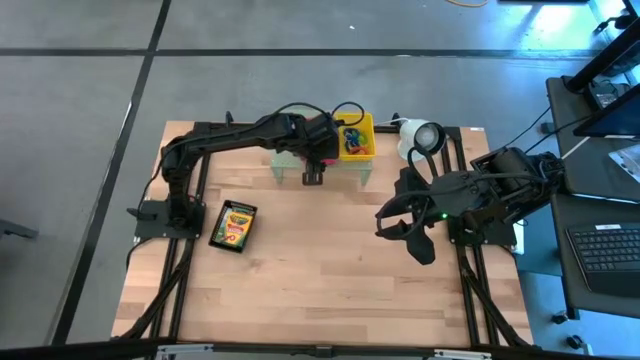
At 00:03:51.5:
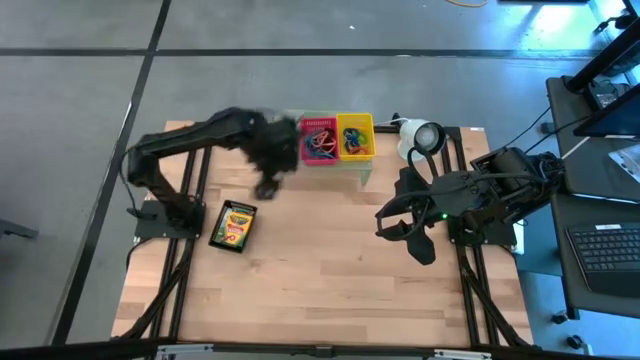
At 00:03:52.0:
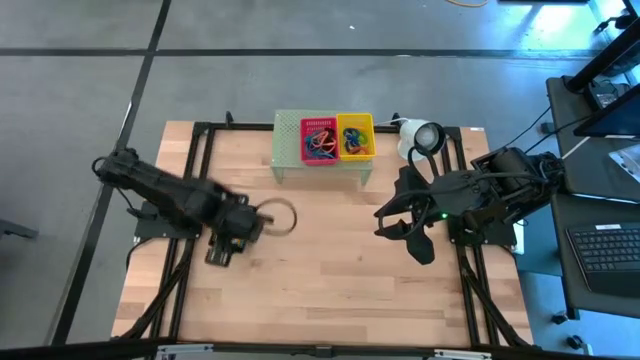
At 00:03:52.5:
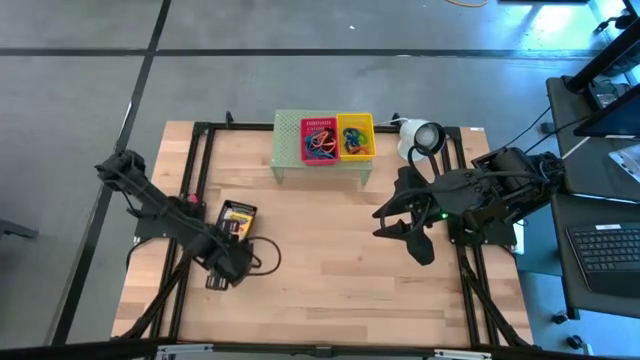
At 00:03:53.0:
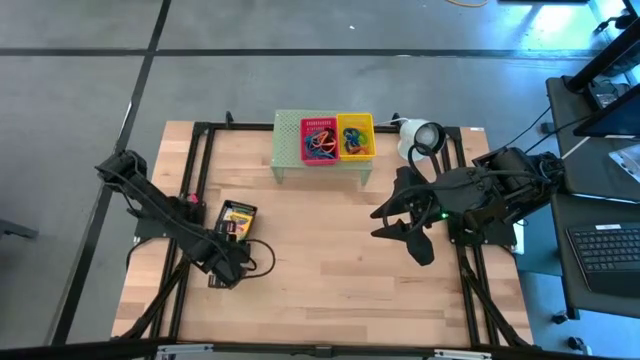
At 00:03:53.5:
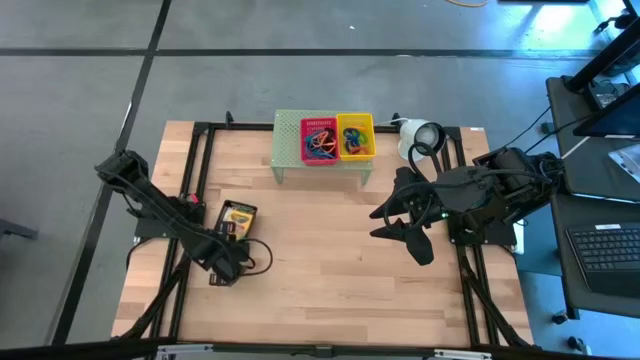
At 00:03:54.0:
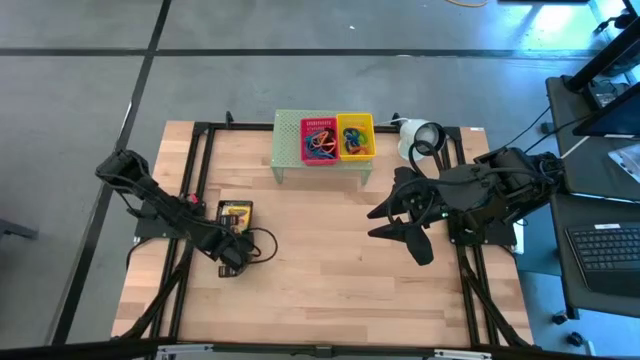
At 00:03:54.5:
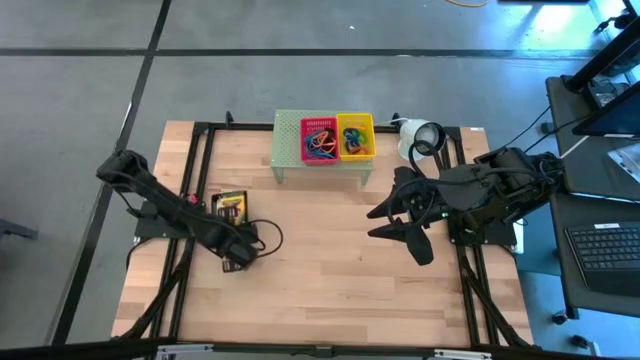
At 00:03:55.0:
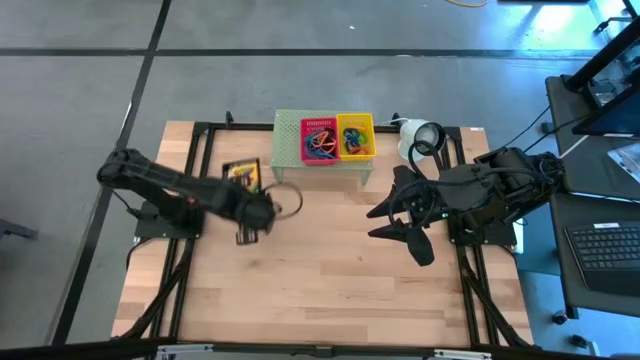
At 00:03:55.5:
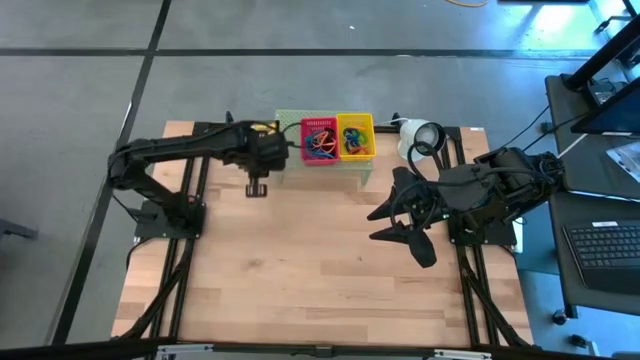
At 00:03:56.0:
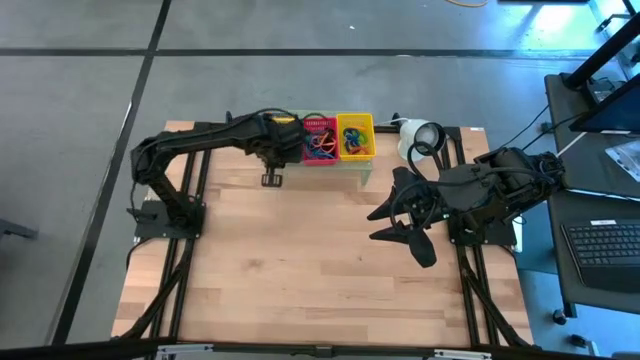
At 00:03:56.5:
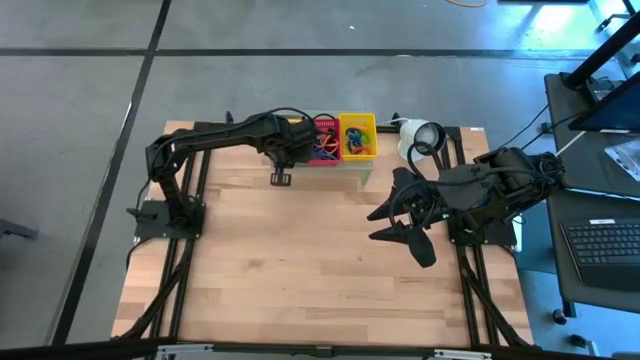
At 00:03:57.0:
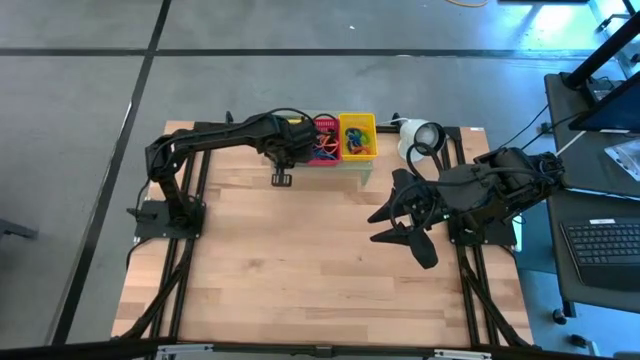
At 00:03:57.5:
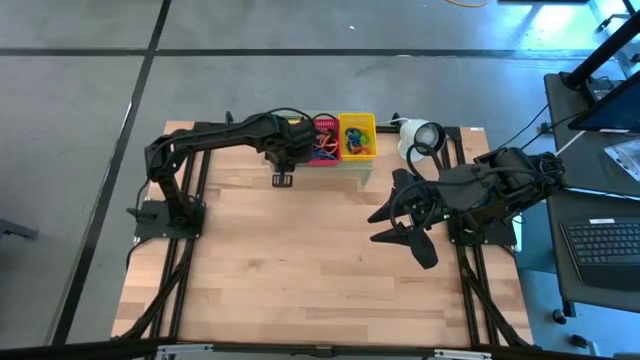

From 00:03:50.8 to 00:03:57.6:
Task: Pick & Place Office Desk Supplies
Put the black bin on the shelf

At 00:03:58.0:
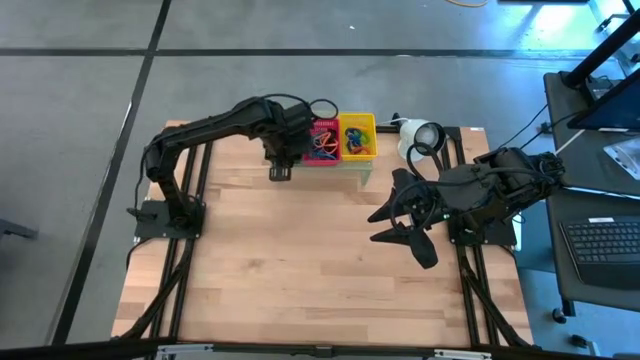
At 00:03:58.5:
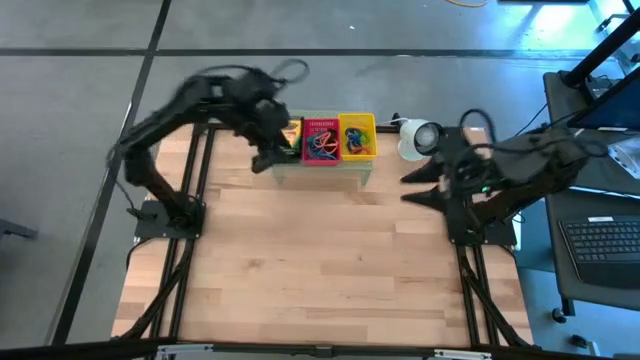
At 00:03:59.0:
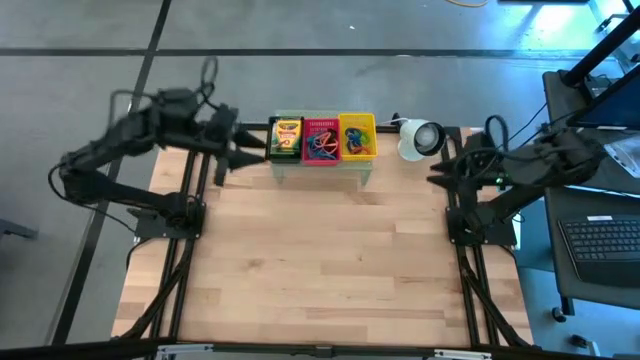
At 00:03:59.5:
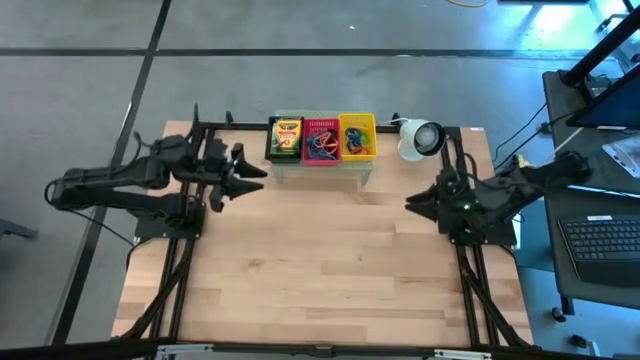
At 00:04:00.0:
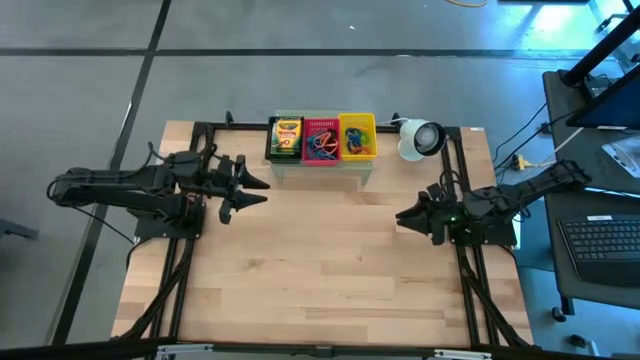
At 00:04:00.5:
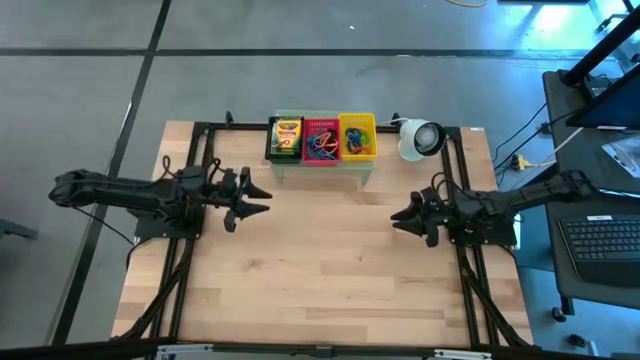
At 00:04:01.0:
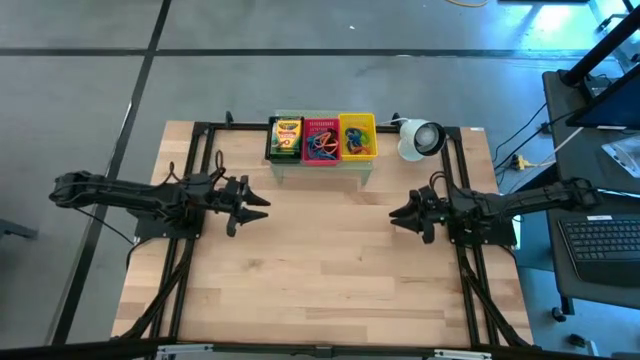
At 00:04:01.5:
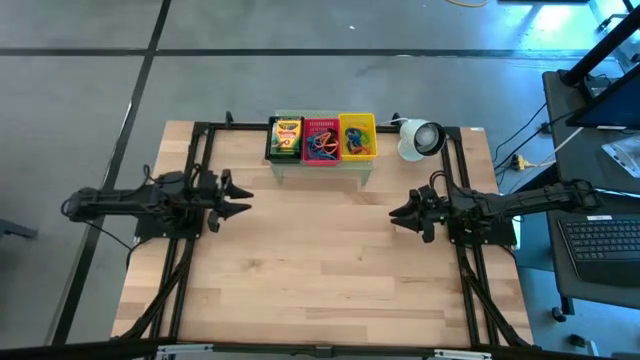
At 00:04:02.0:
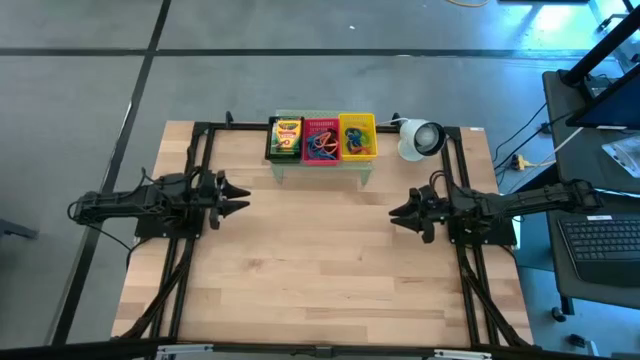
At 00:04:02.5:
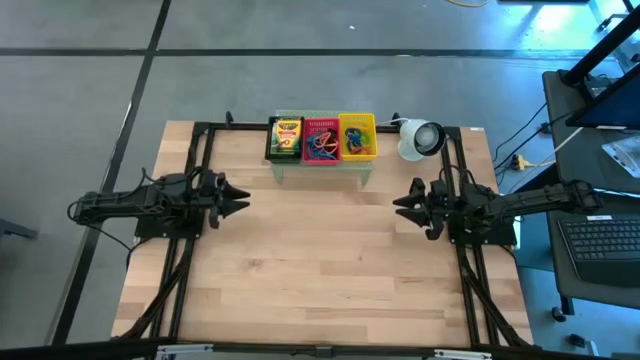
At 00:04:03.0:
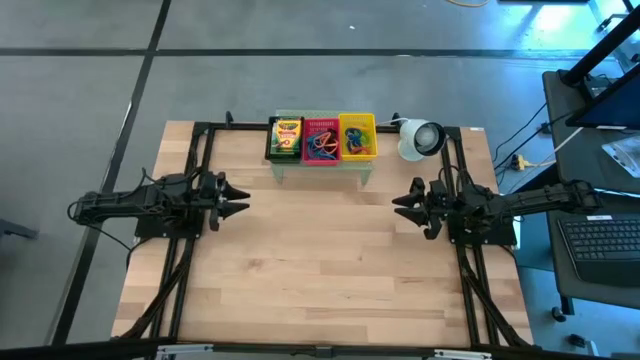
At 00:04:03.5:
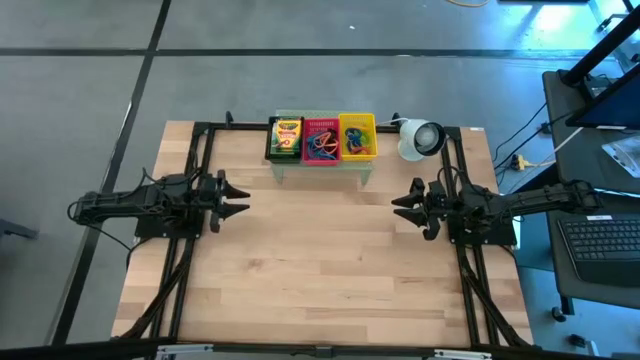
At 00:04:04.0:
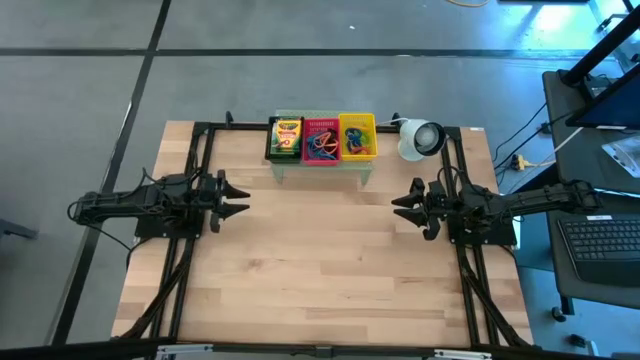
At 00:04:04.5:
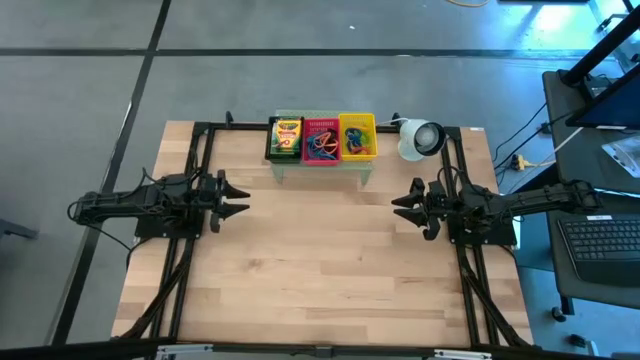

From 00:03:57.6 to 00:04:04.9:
Return to Home Position

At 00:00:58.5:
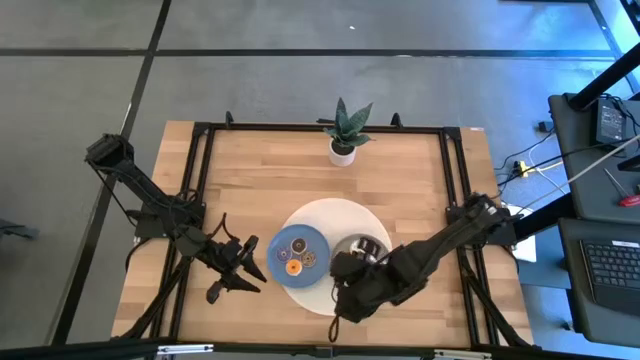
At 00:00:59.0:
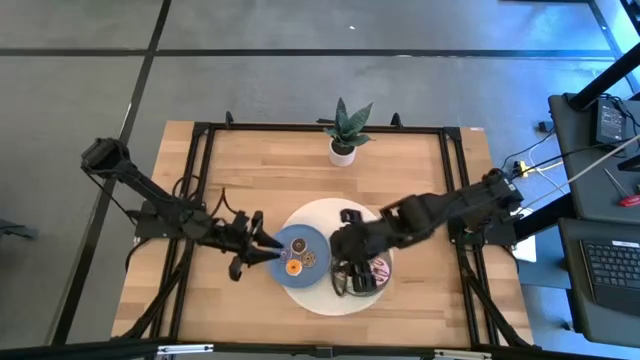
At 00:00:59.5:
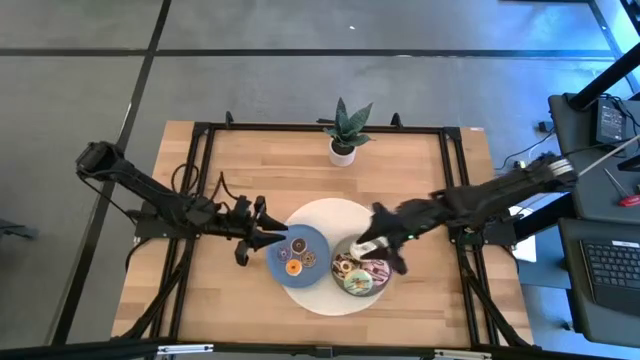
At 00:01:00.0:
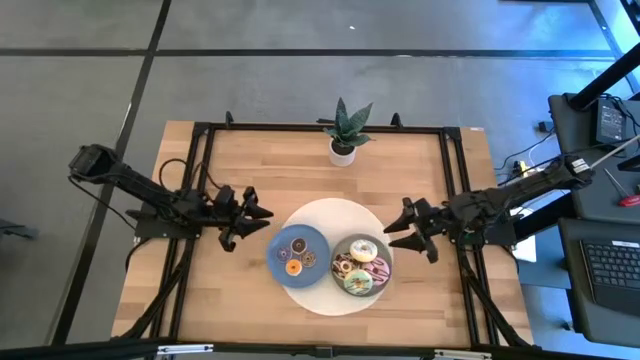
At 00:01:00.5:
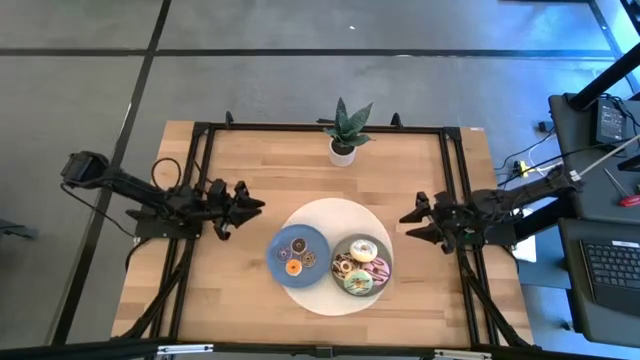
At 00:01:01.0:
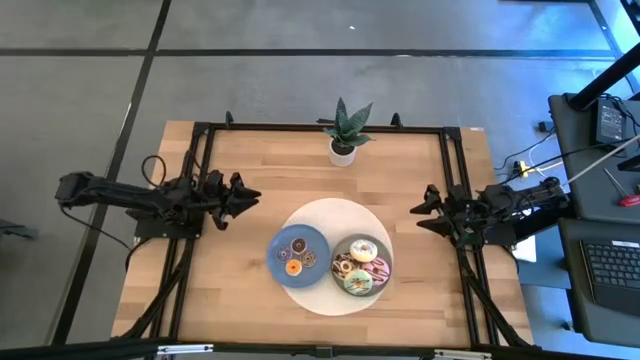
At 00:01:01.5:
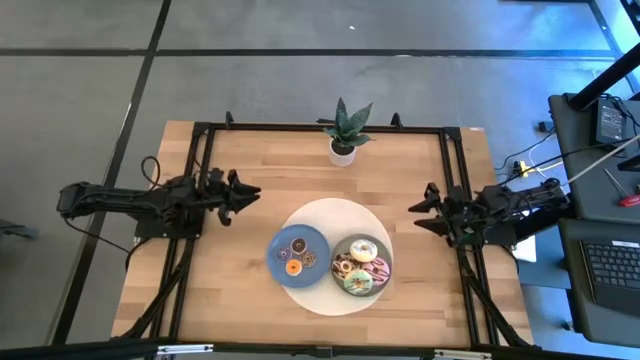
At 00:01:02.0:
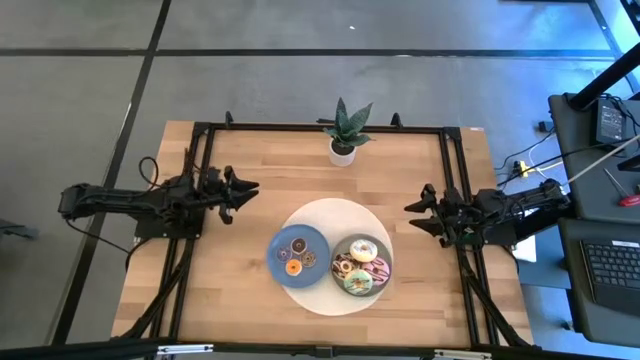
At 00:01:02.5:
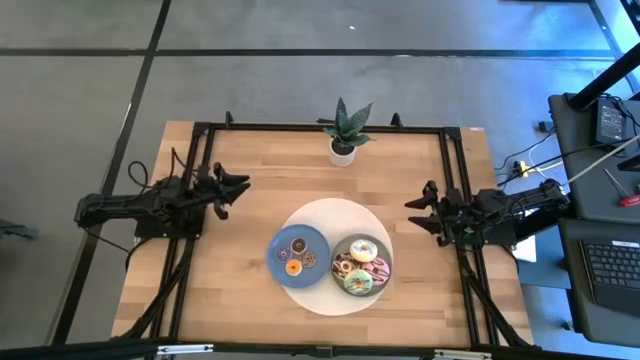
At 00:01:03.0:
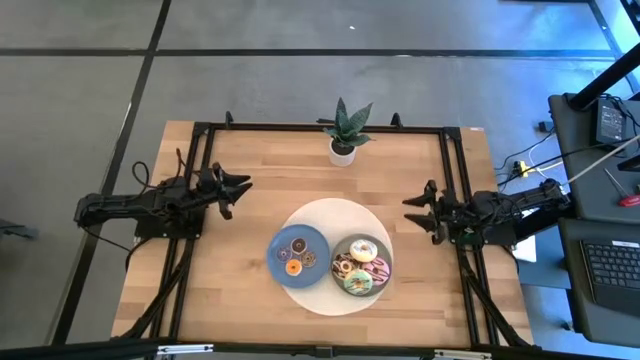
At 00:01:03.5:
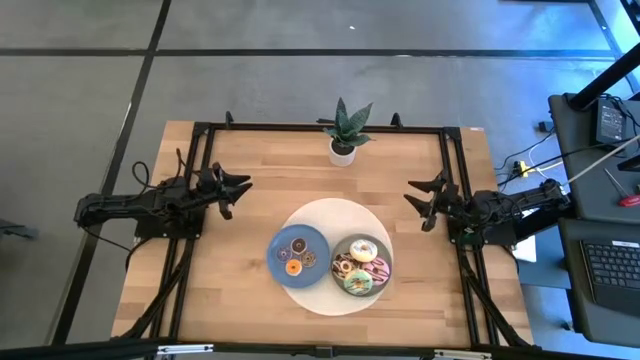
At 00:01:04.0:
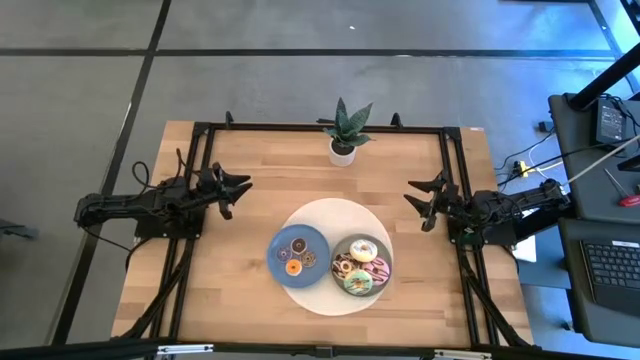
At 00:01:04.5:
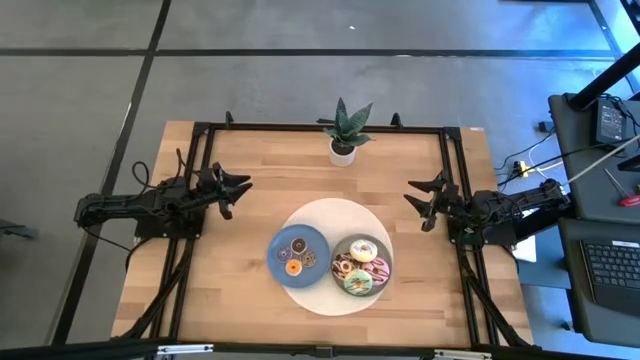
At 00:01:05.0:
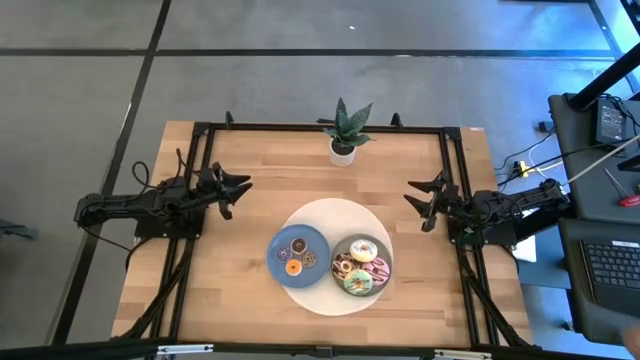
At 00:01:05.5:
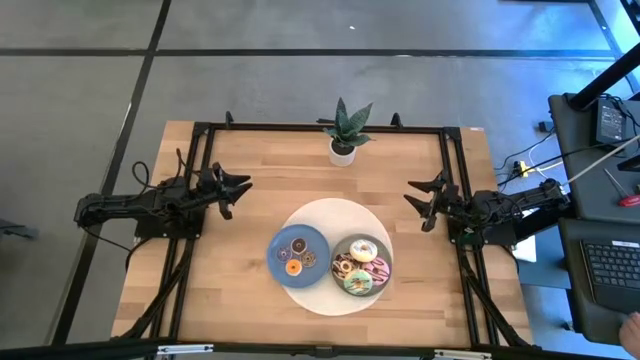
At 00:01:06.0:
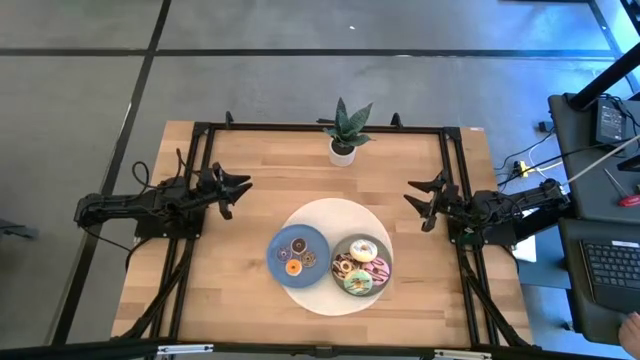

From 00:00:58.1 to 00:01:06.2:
Task: Pick & Place donuts
Return to Home Position
